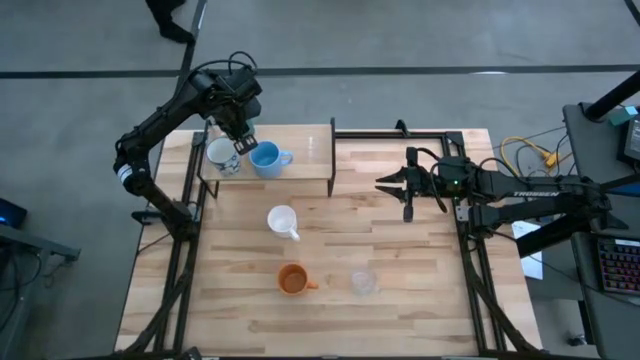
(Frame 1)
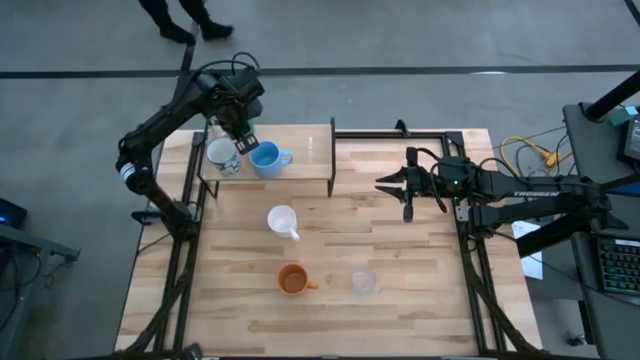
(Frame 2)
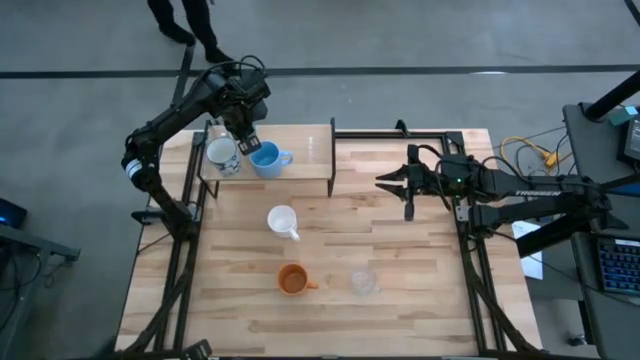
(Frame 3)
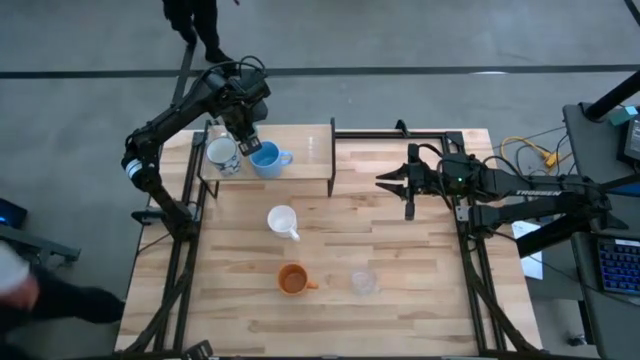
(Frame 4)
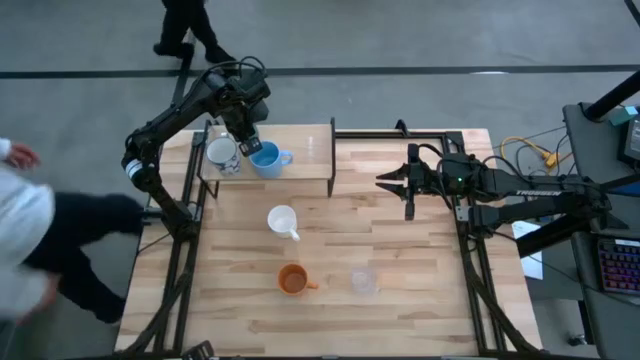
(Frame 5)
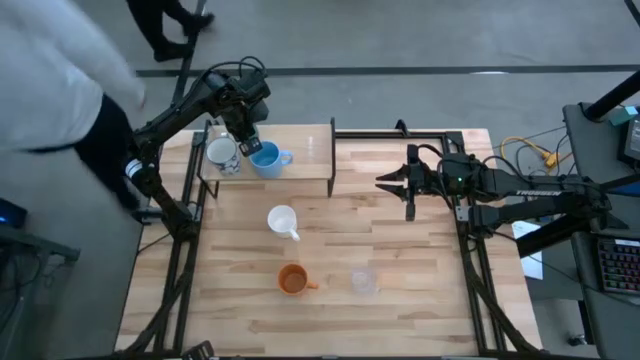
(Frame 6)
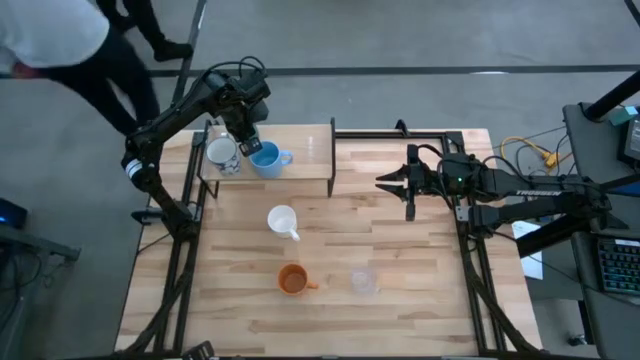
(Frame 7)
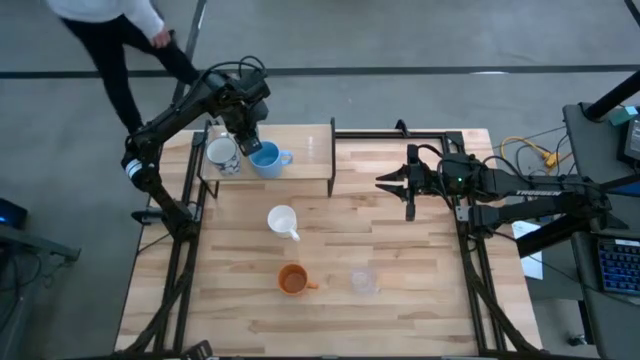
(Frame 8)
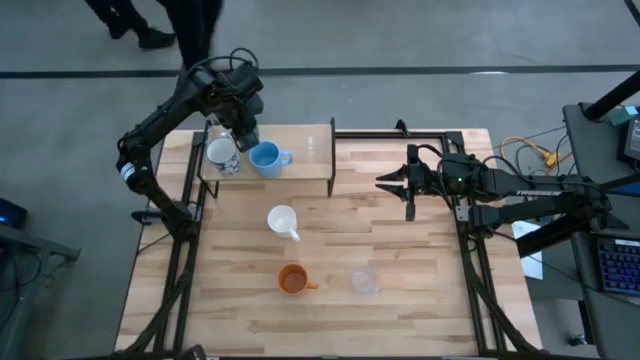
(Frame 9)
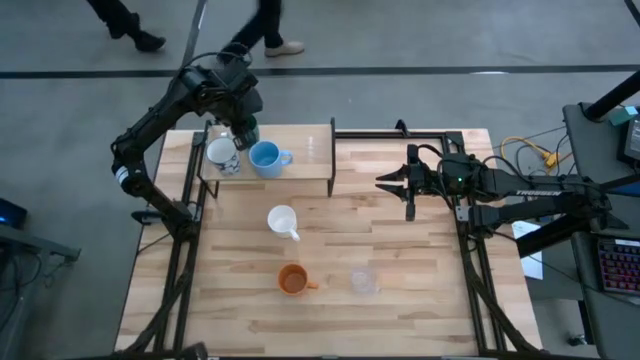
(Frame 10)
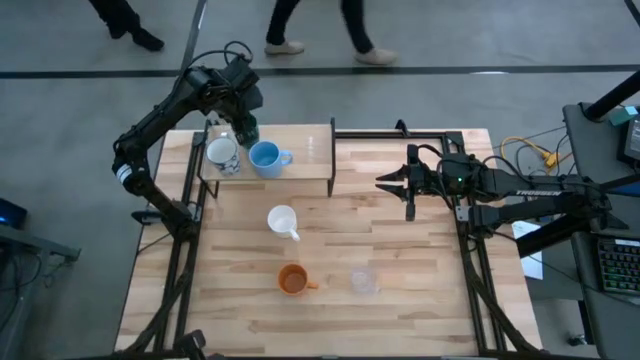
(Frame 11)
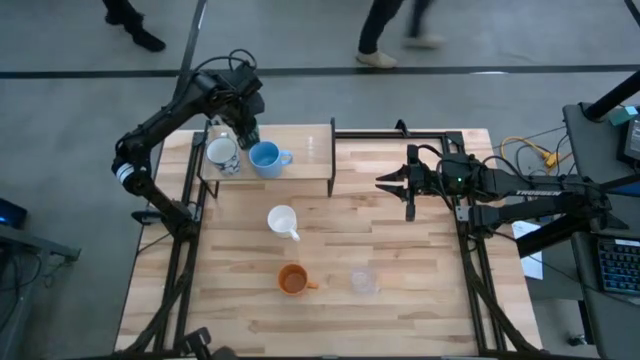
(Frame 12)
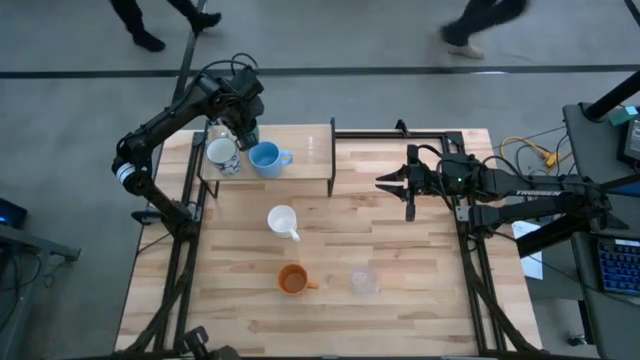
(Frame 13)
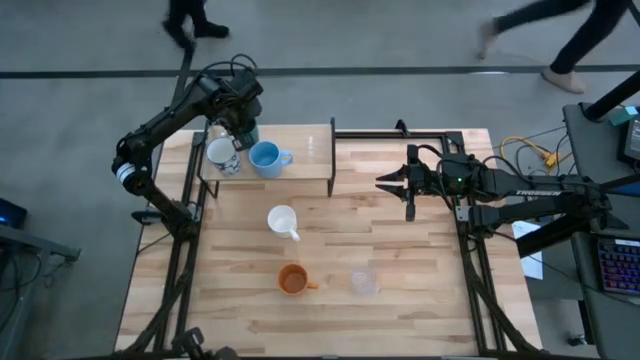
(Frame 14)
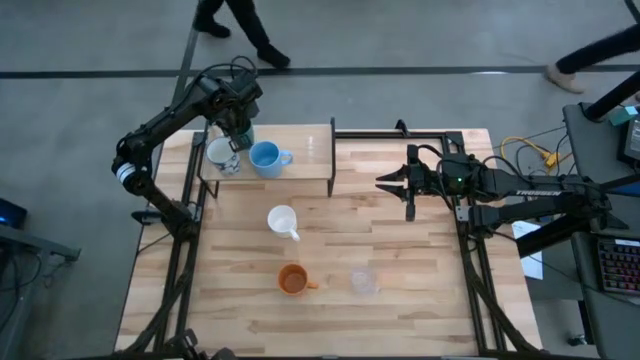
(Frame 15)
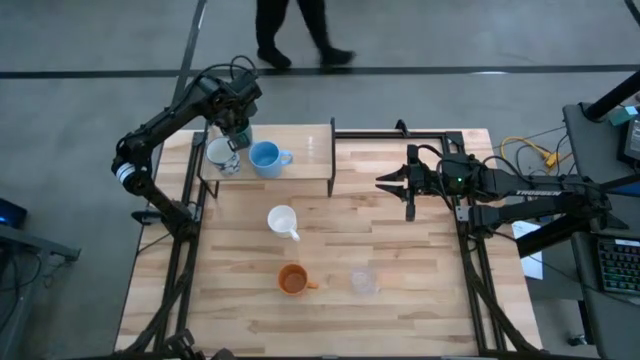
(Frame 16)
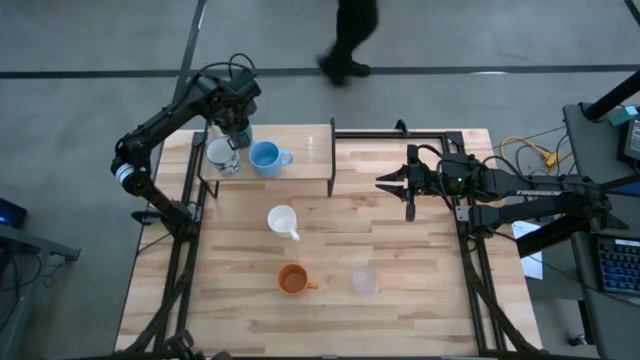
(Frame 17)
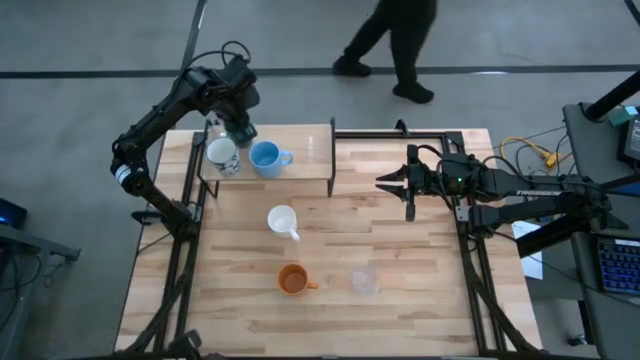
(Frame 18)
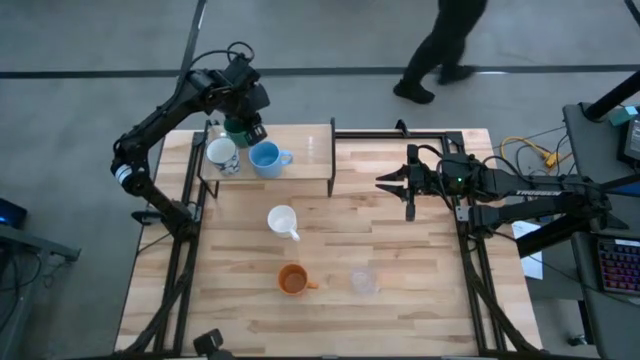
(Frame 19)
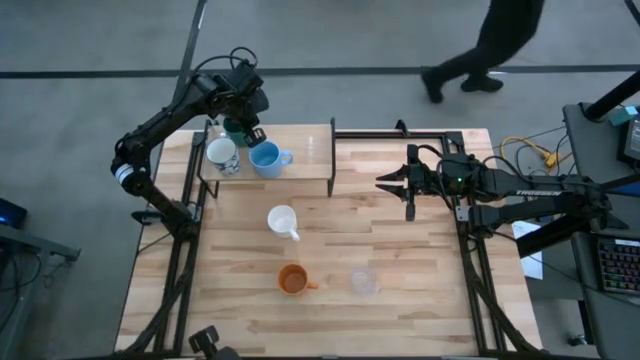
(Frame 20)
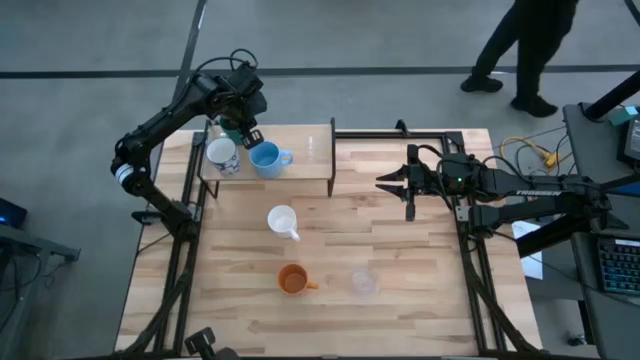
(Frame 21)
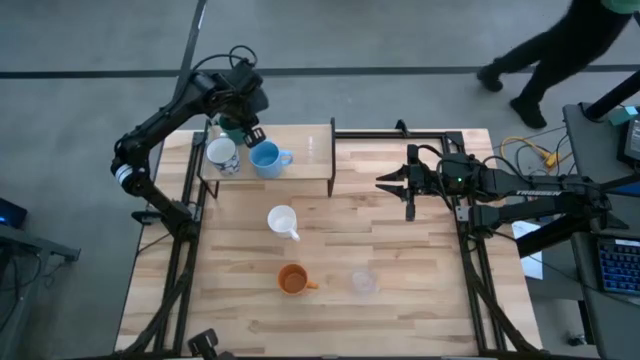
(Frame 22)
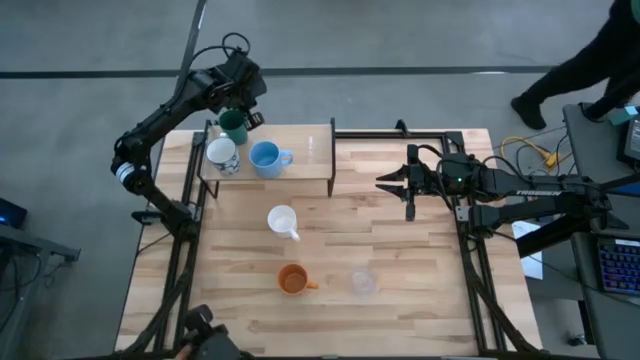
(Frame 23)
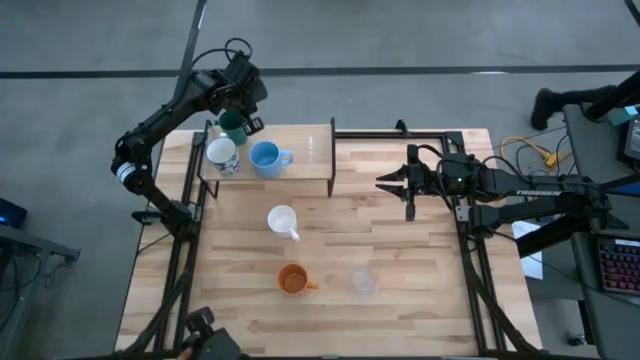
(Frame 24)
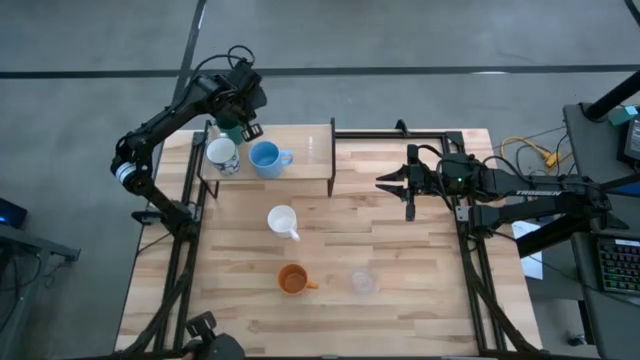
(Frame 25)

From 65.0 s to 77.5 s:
Task: Stack small to large cups/mugs on shelf
Put the green mug on the shelf

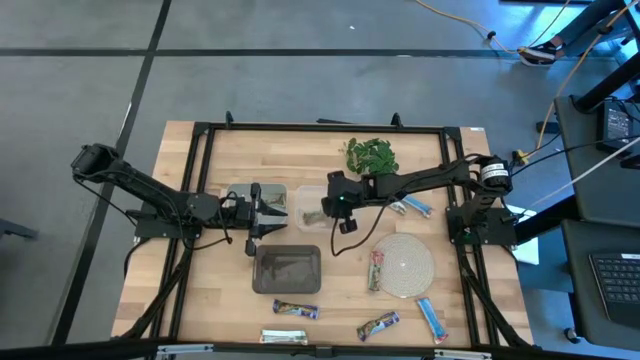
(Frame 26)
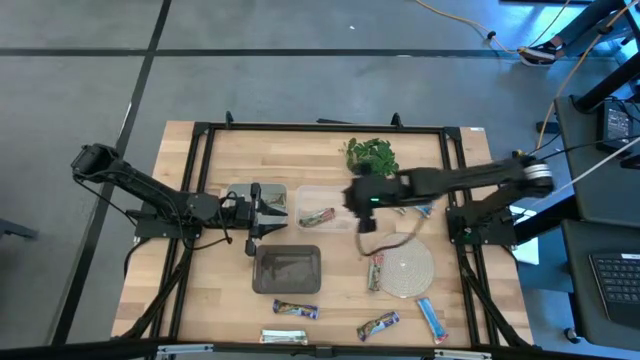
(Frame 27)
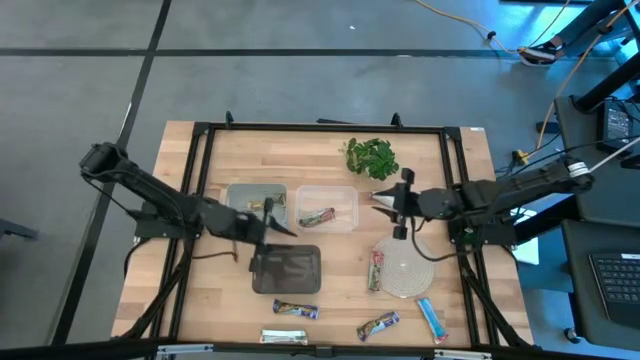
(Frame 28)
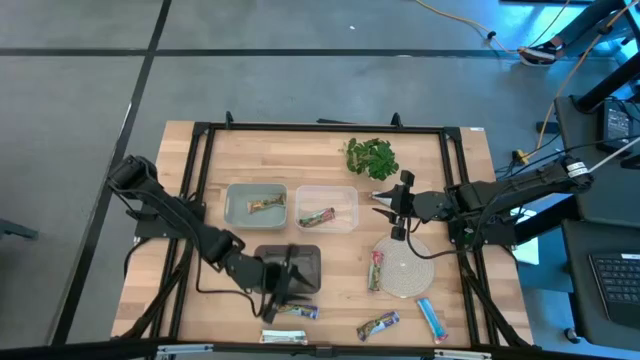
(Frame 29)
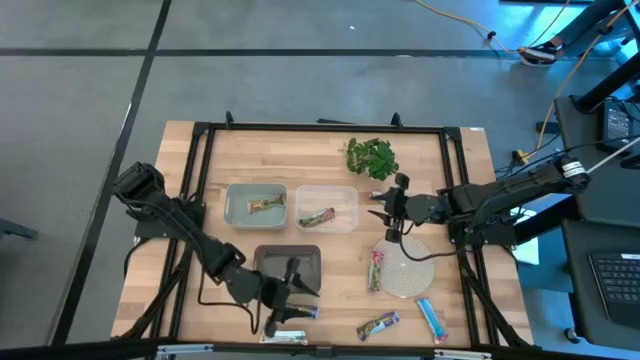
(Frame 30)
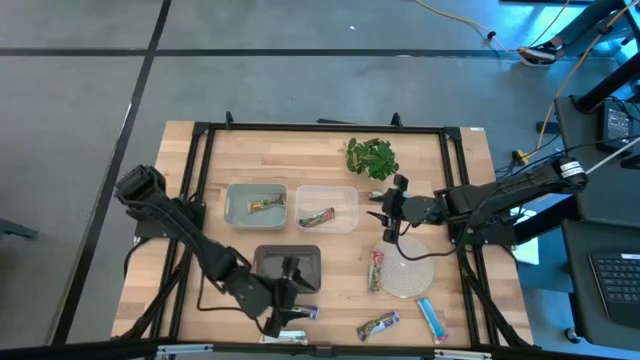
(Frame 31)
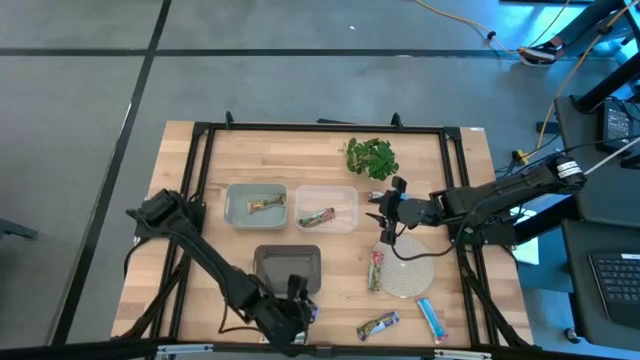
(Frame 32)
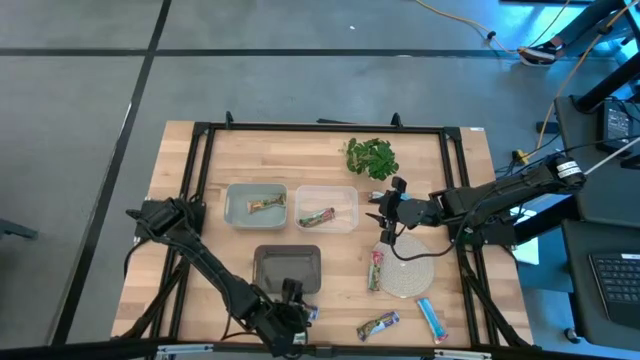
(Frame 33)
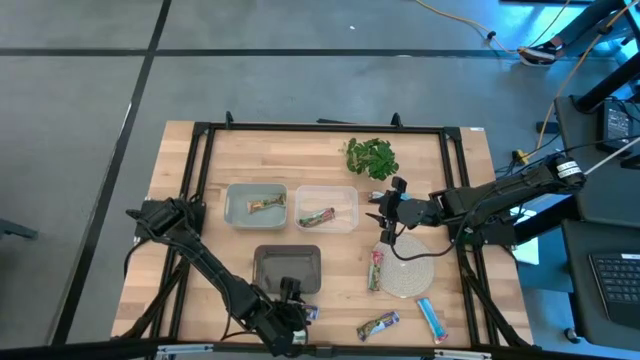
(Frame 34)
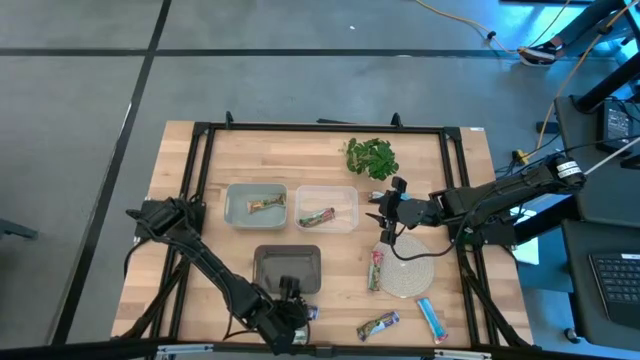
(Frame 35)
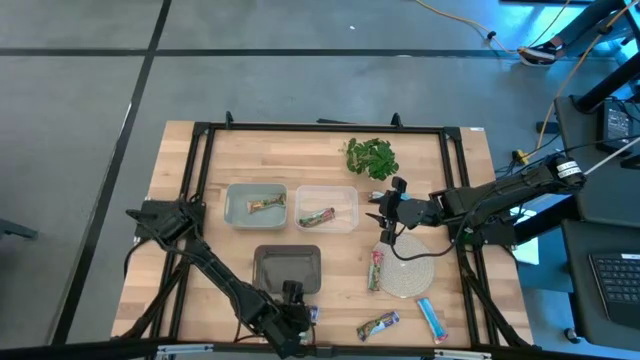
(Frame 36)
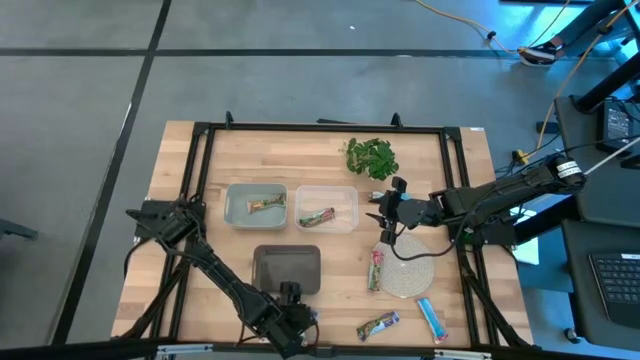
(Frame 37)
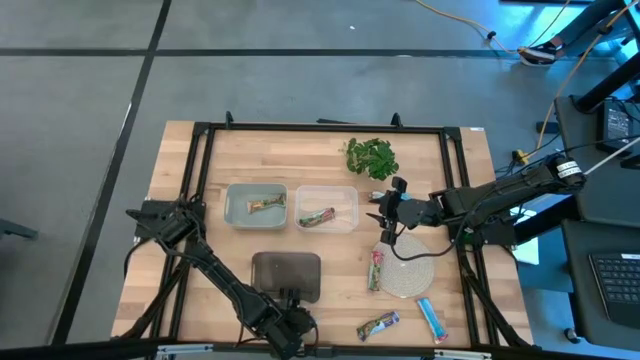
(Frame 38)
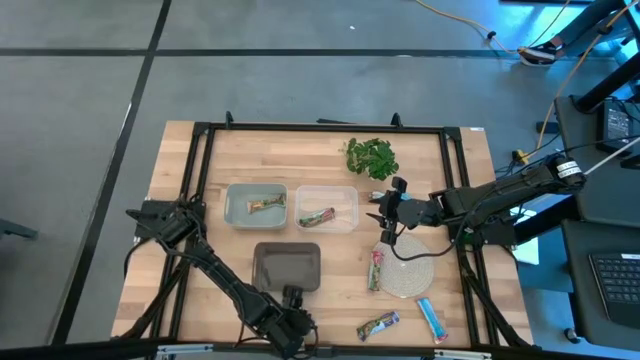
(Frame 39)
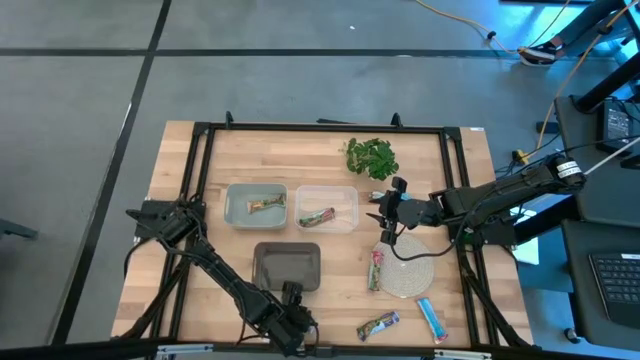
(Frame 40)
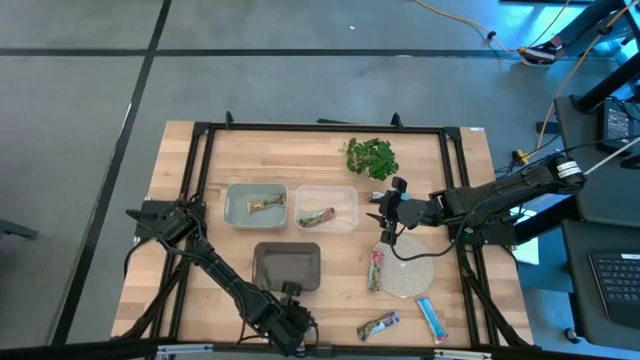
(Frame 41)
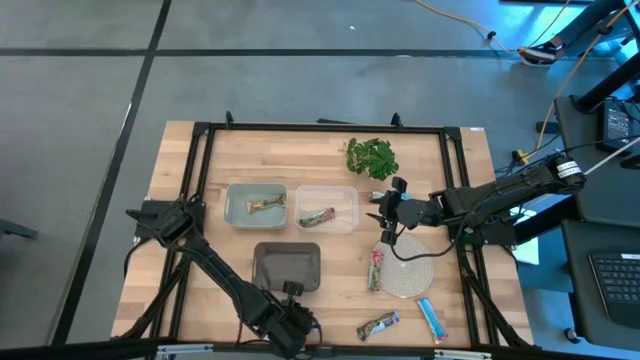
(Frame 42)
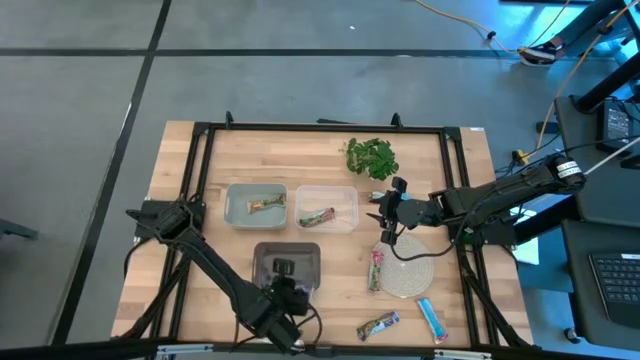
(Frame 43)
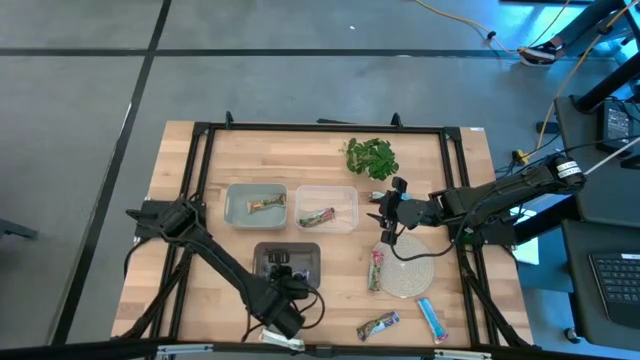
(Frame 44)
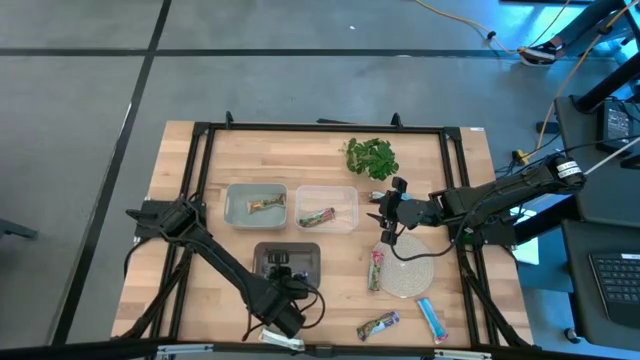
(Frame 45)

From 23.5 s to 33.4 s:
Task: Pick and place Granola Bars by type
Put the blue granola bar into the black transparent bin
